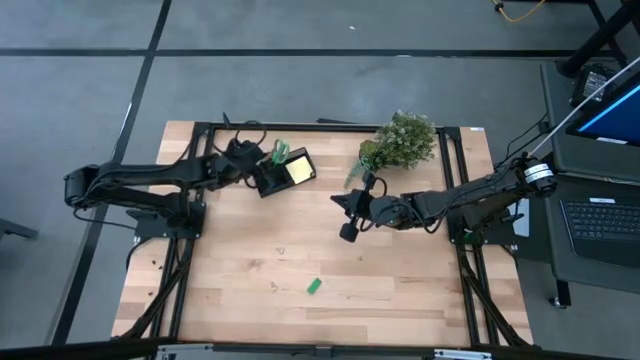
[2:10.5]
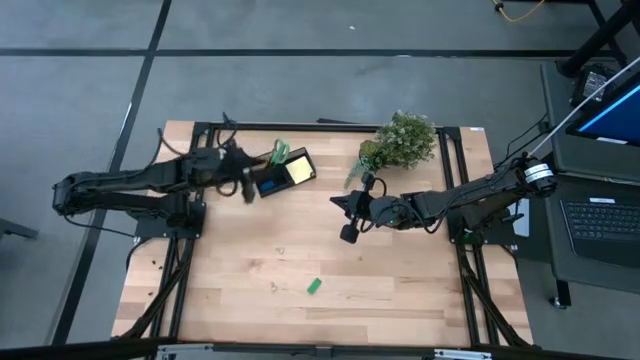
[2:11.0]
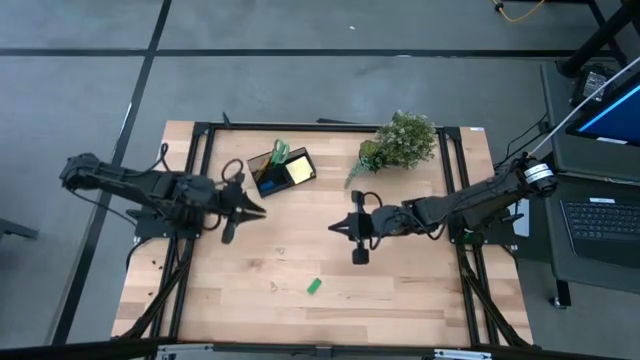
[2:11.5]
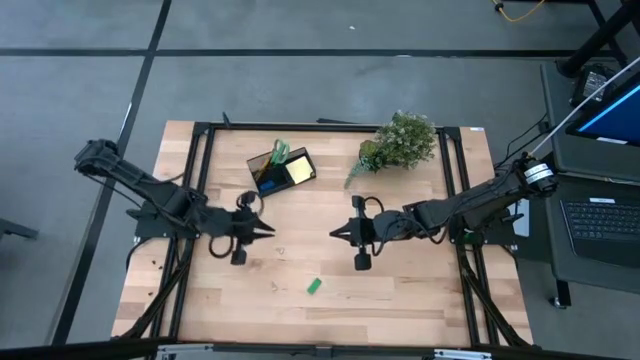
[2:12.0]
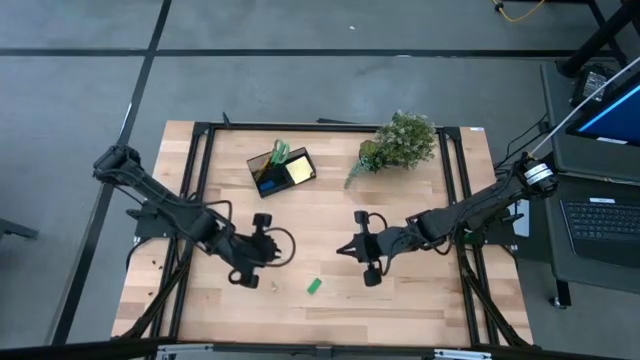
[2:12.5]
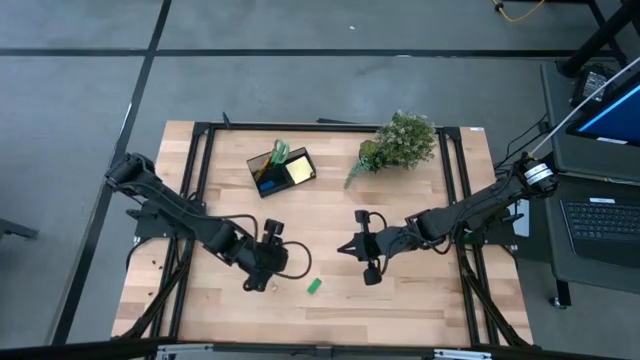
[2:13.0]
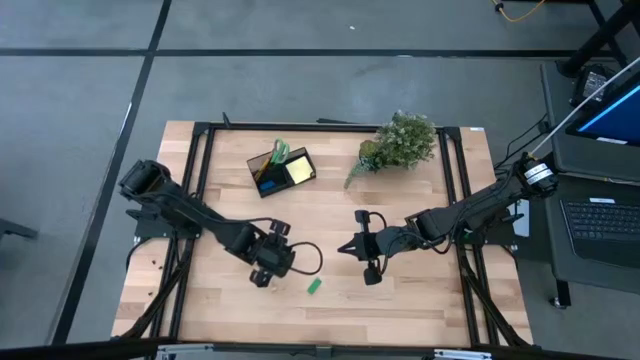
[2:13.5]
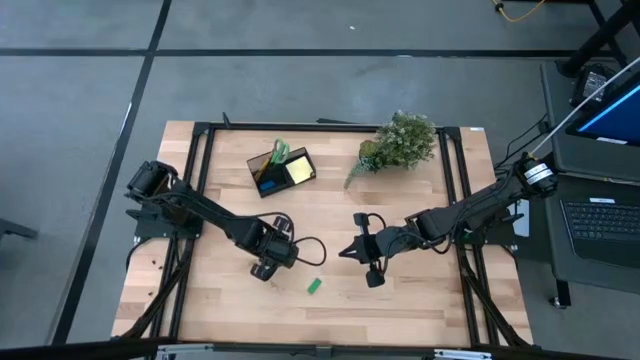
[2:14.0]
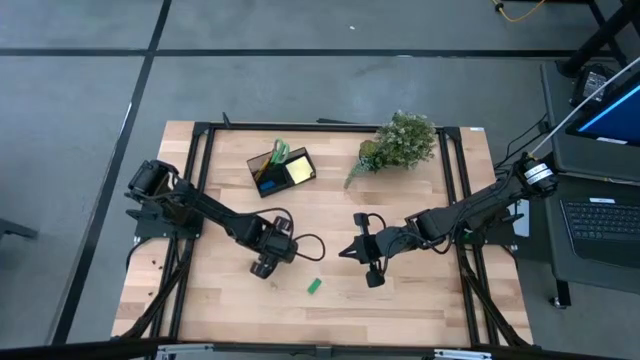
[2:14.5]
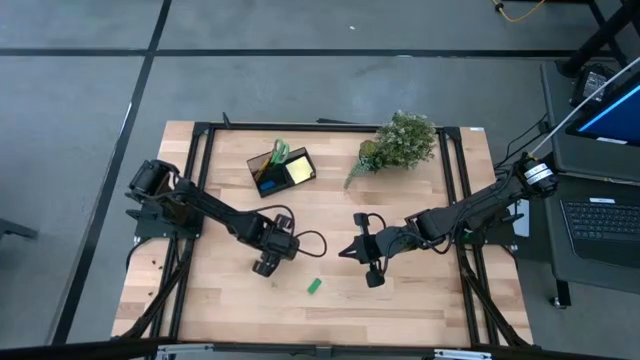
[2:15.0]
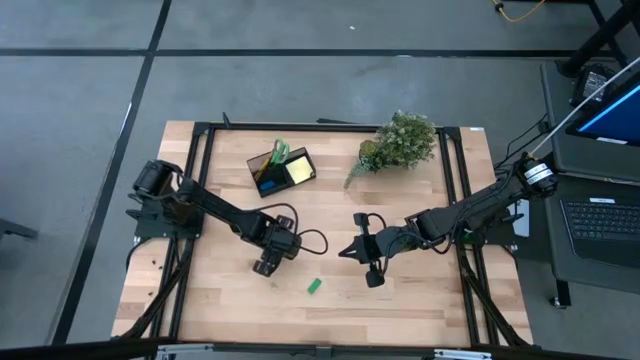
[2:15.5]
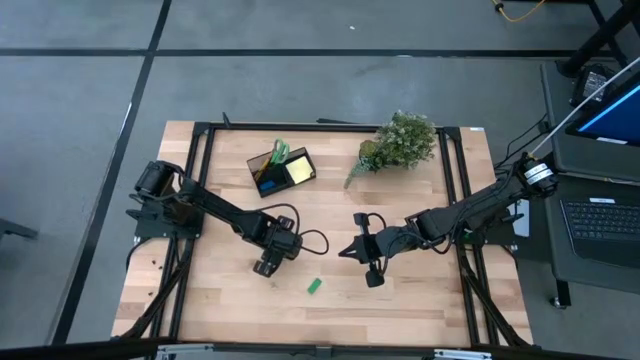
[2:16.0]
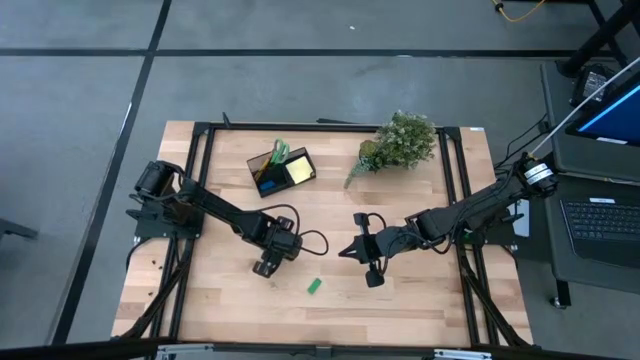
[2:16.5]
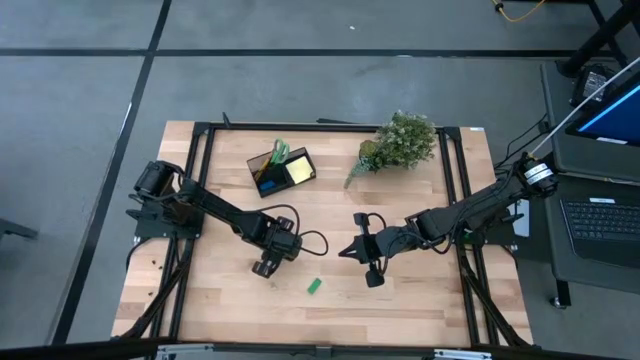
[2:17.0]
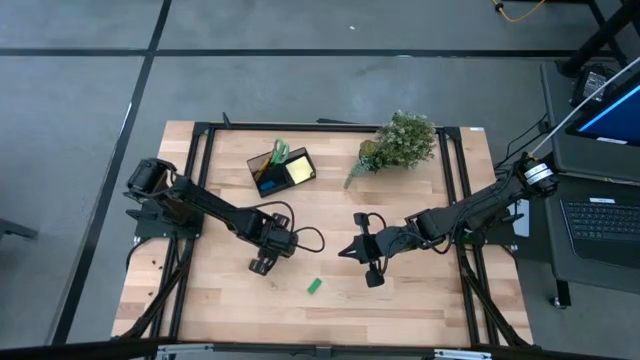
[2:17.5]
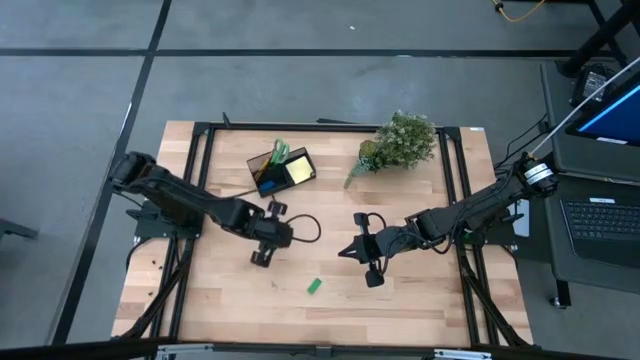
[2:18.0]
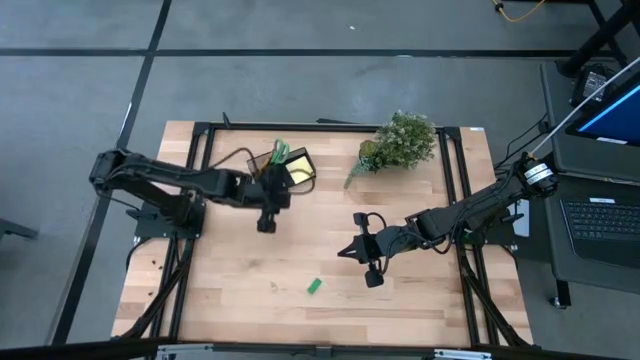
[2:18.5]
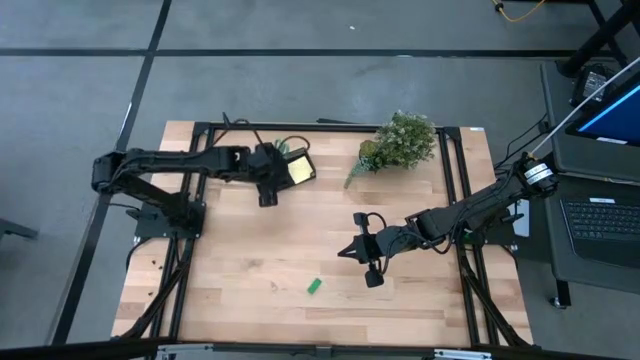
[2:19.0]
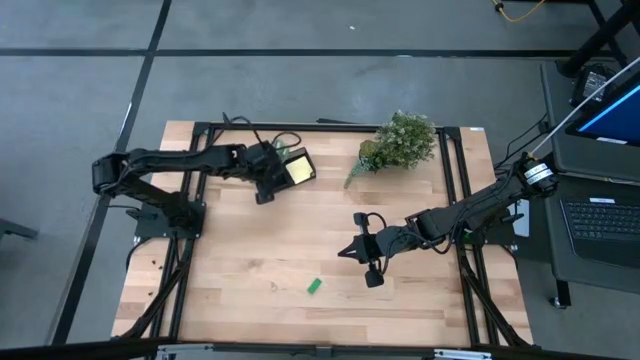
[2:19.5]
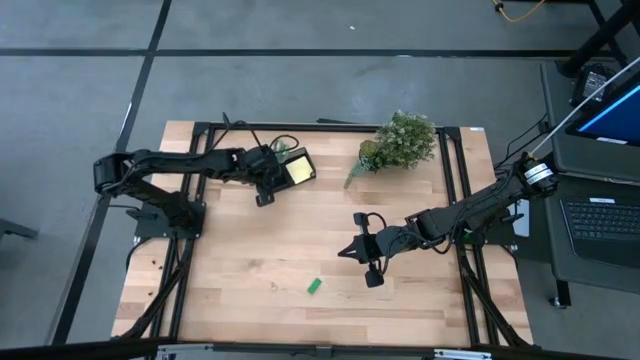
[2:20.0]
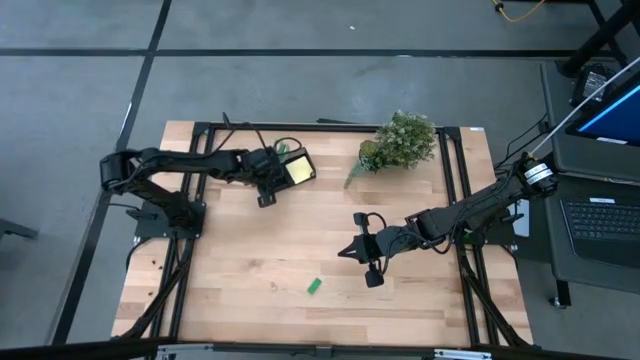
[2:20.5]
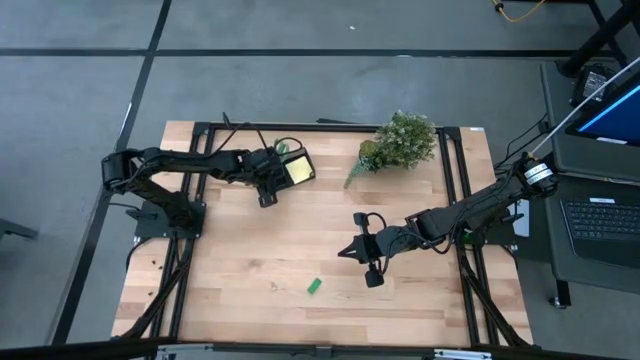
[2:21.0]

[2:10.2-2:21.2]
Task: Pick and place office supplies into organizer
Put the top white binder clip into the desk organizer

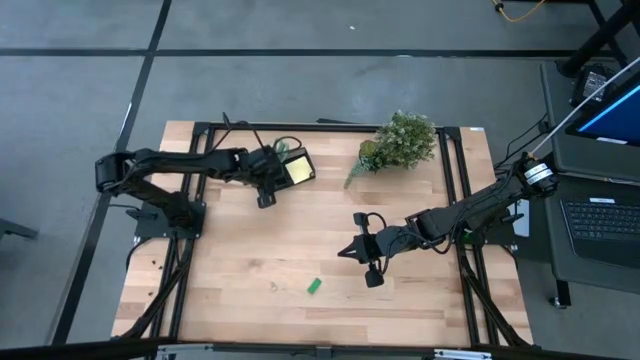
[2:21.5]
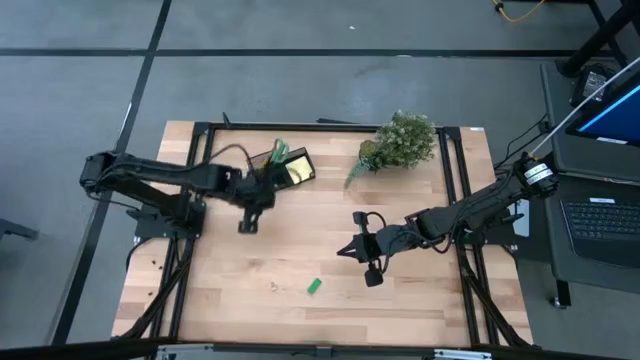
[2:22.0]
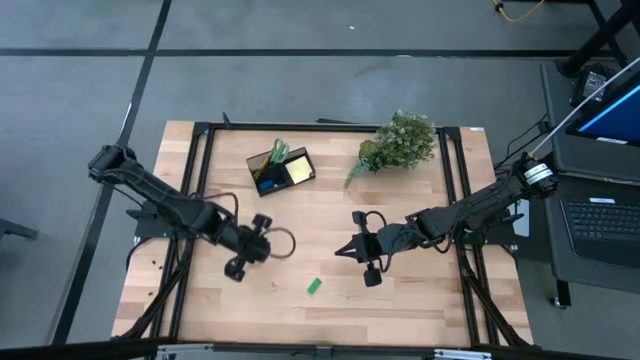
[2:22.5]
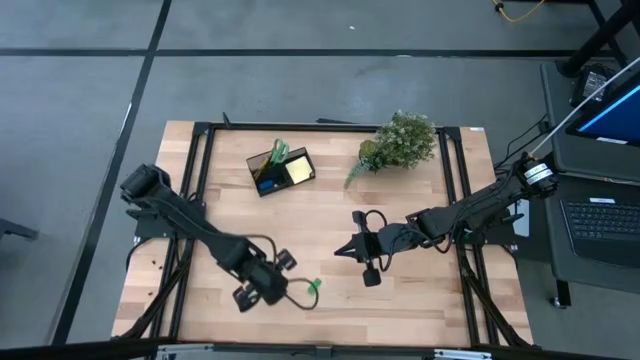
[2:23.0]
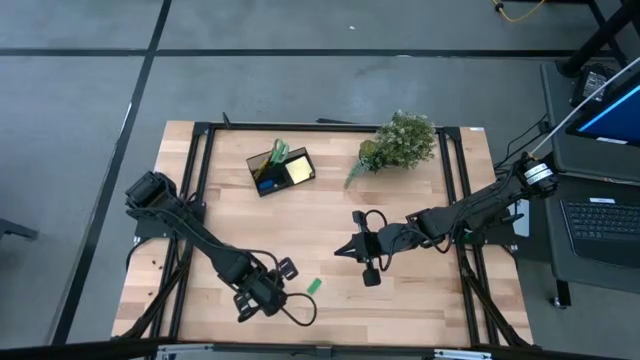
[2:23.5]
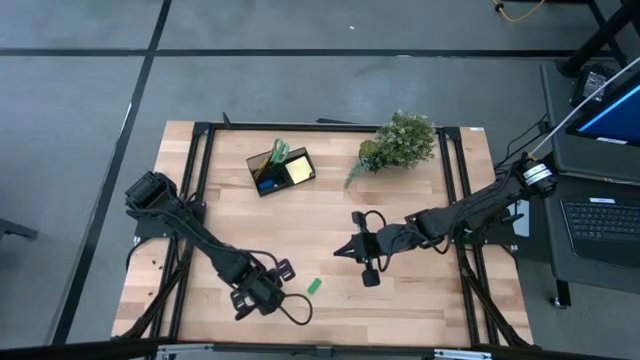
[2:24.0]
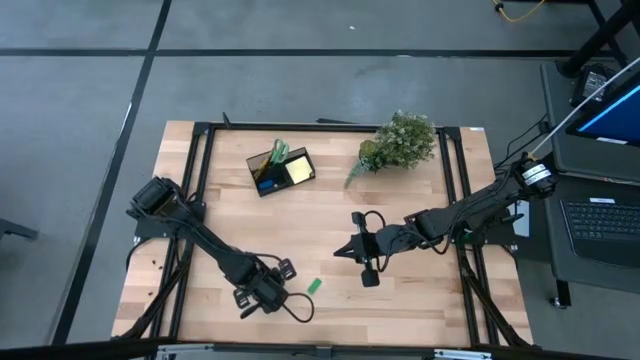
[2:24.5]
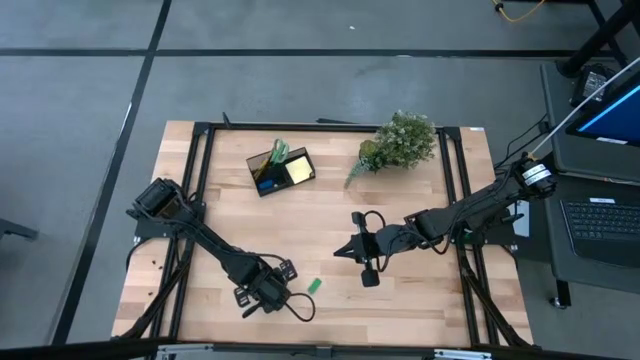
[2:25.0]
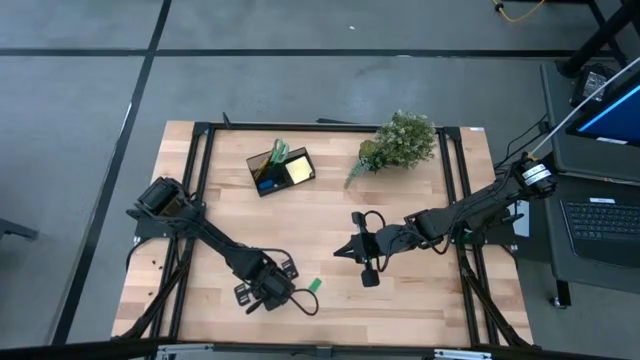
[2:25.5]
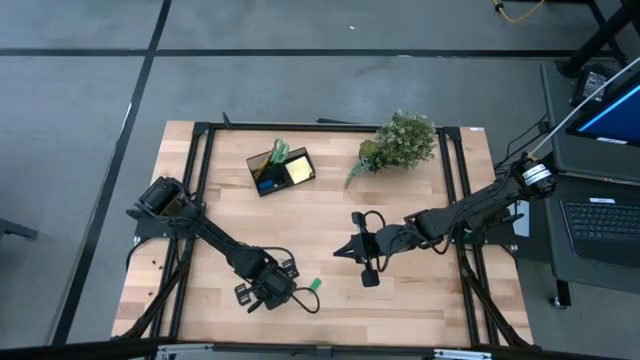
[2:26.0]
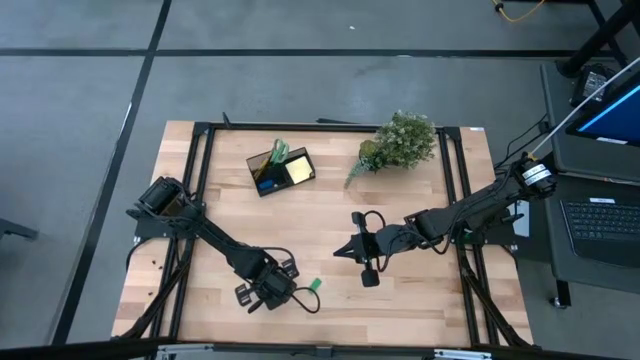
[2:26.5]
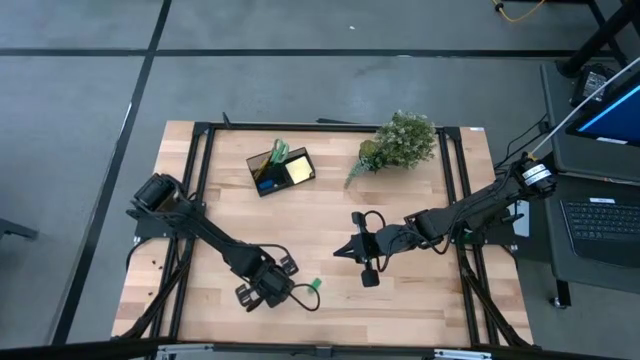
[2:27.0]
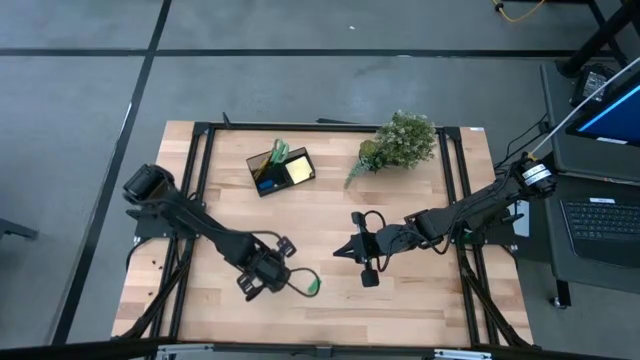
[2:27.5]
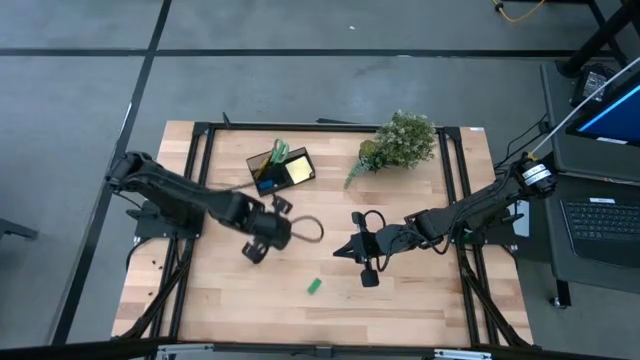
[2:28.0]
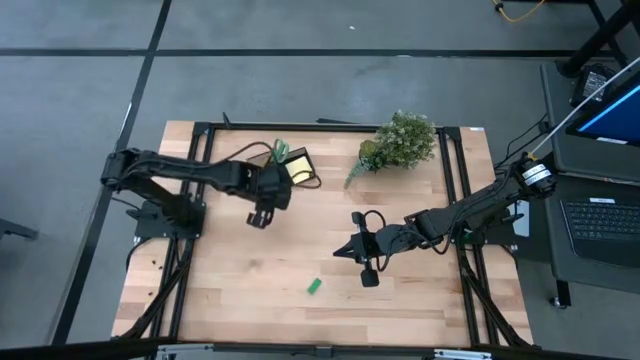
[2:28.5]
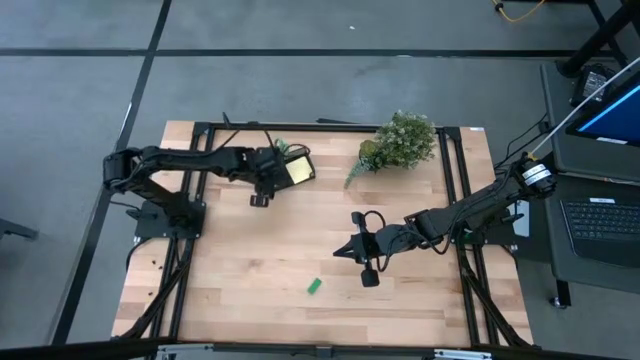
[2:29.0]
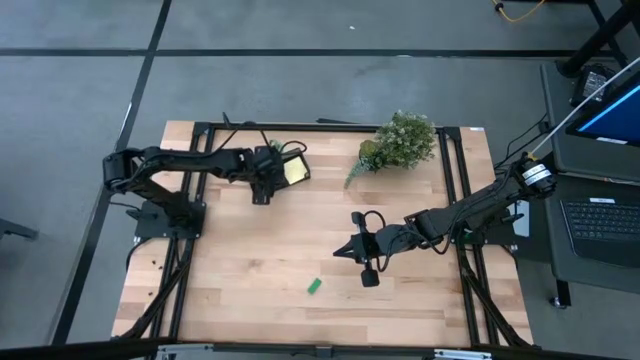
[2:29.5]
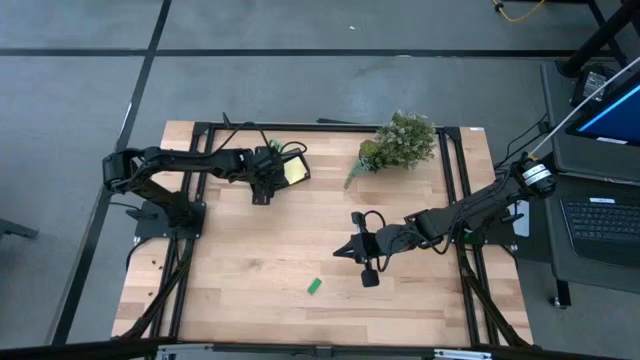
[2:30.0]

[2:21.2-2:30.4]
Put the white binder clip into the desk organizer
